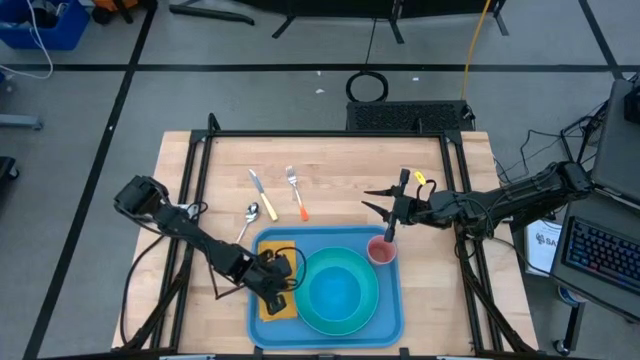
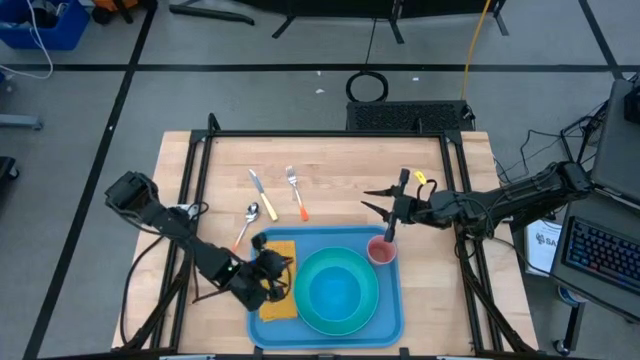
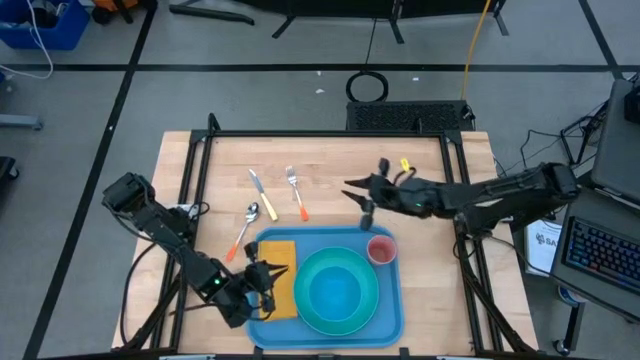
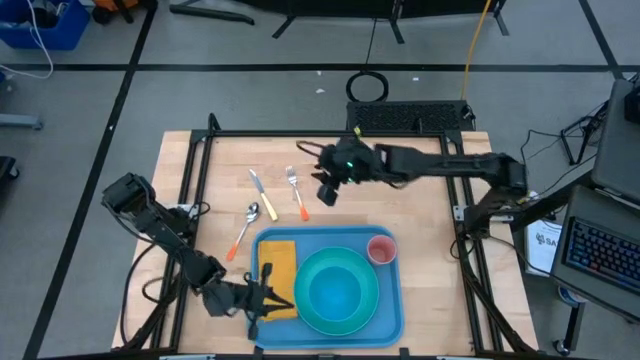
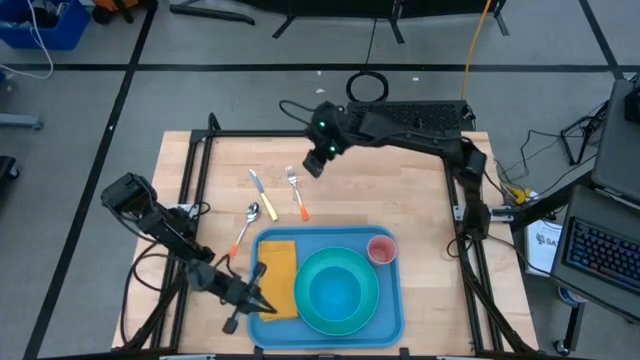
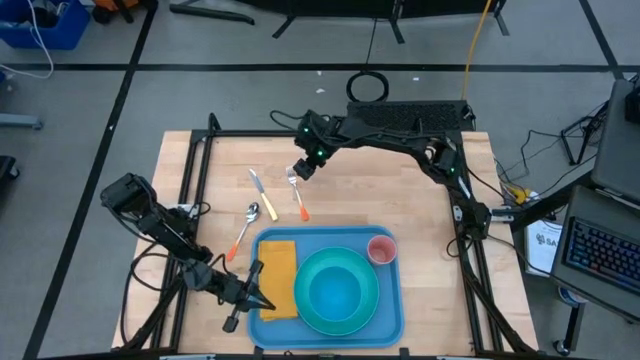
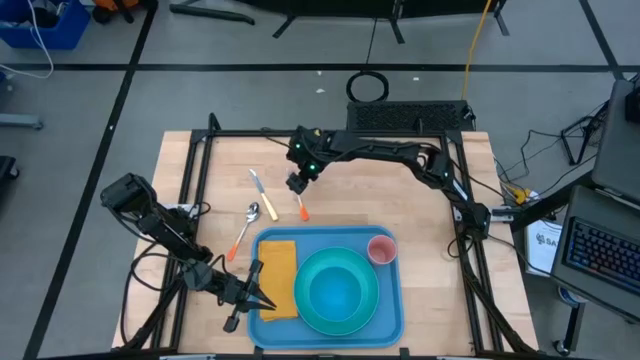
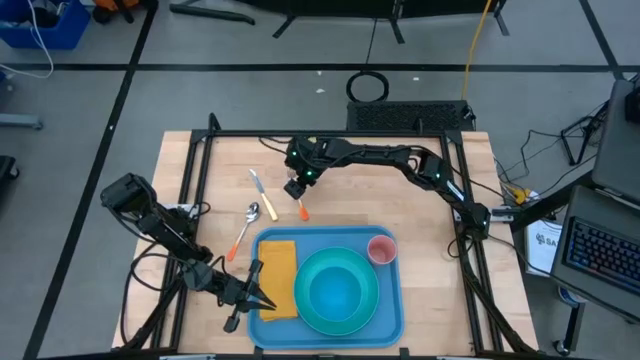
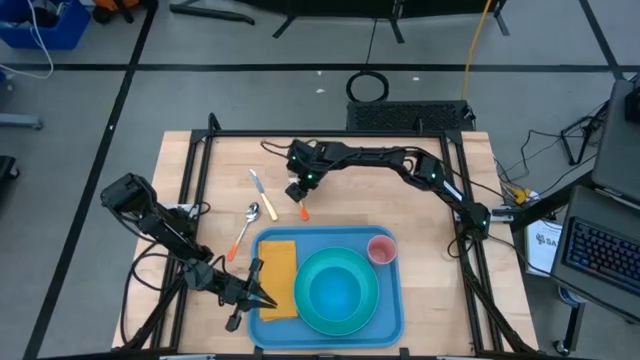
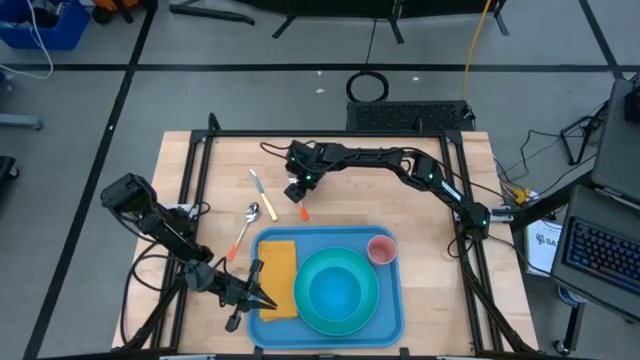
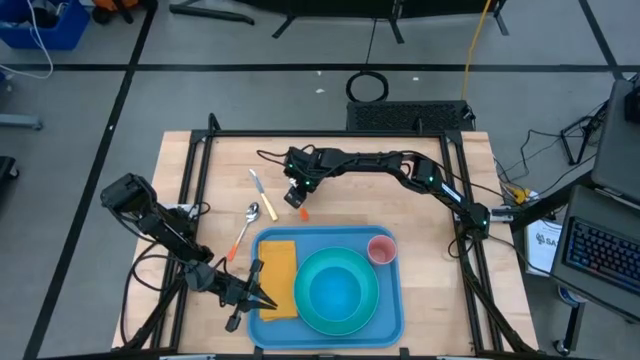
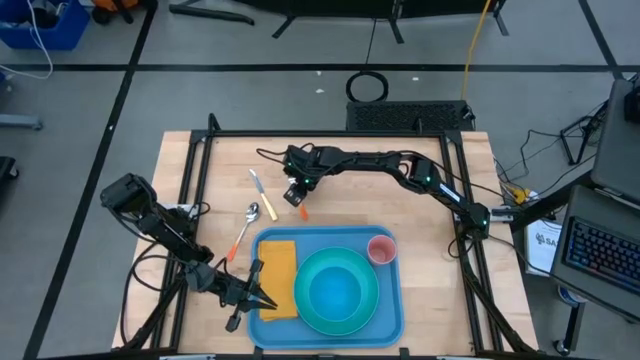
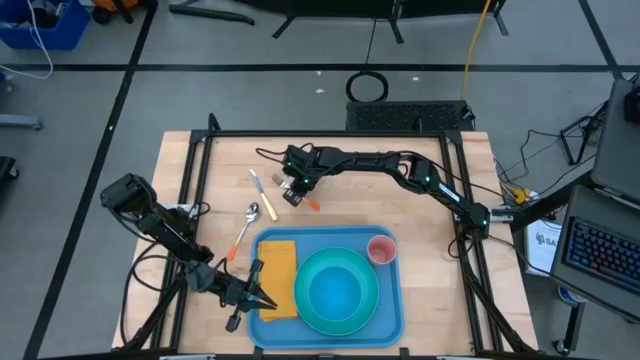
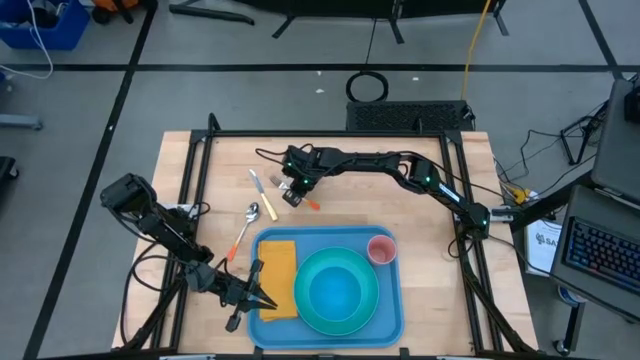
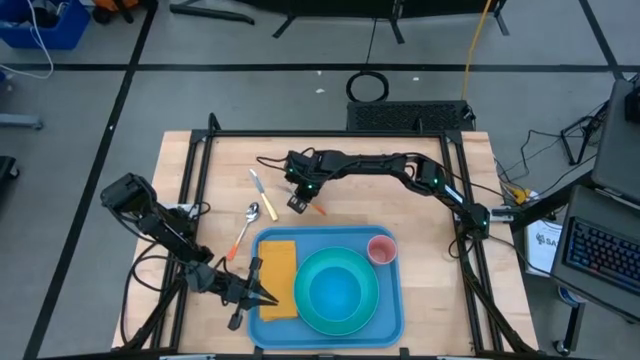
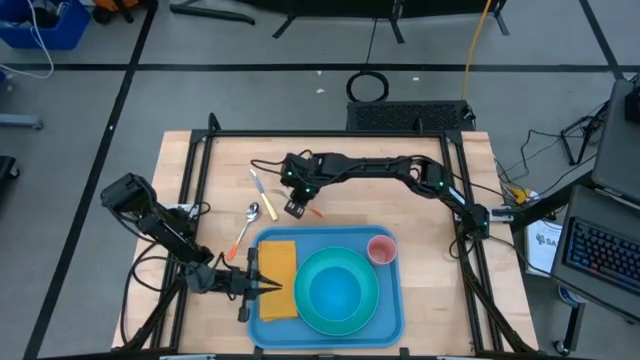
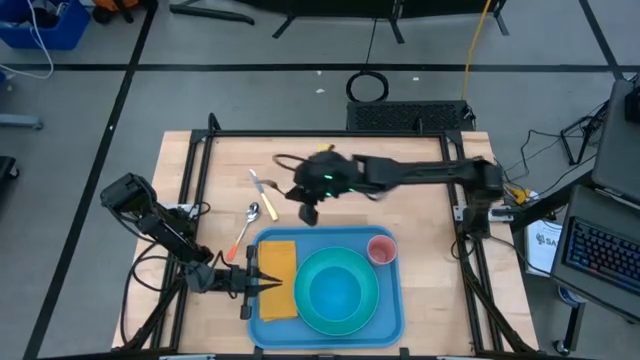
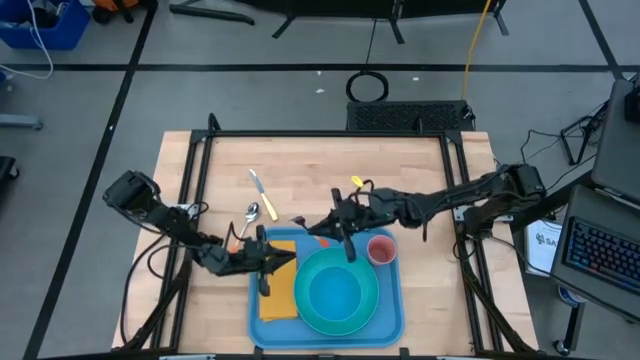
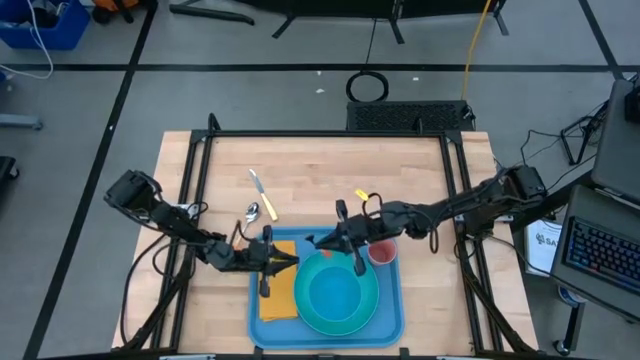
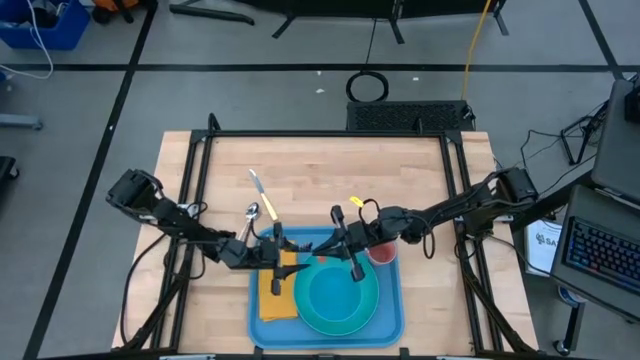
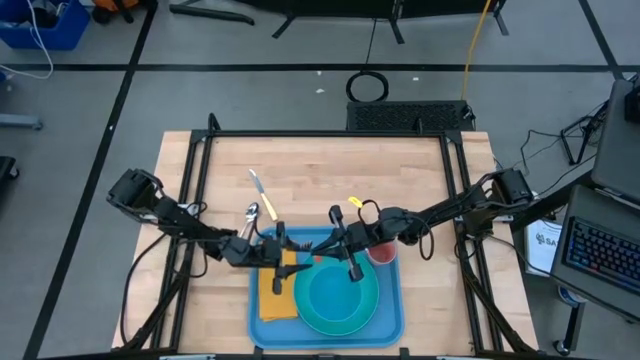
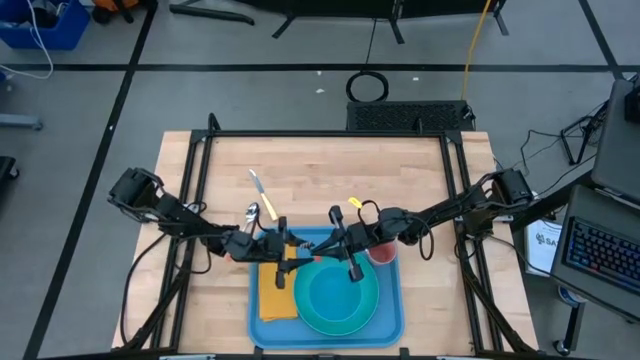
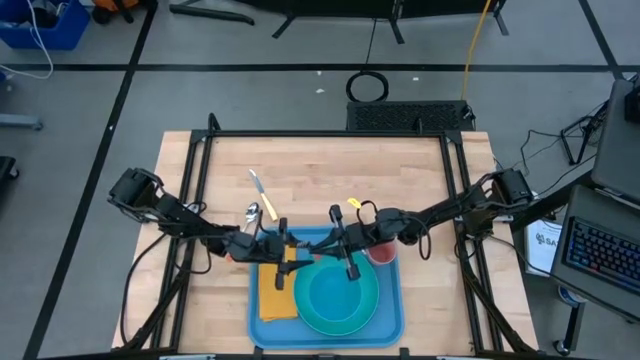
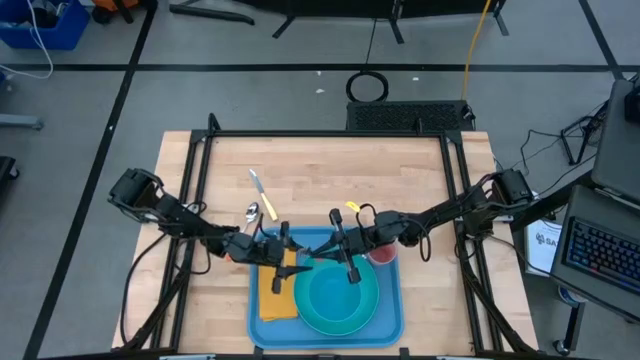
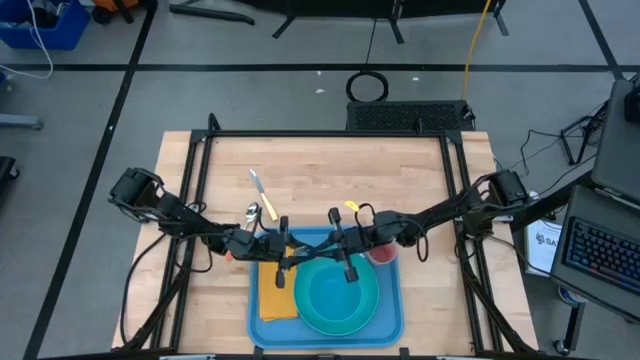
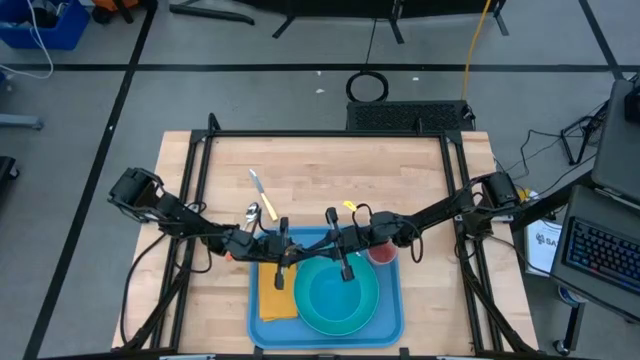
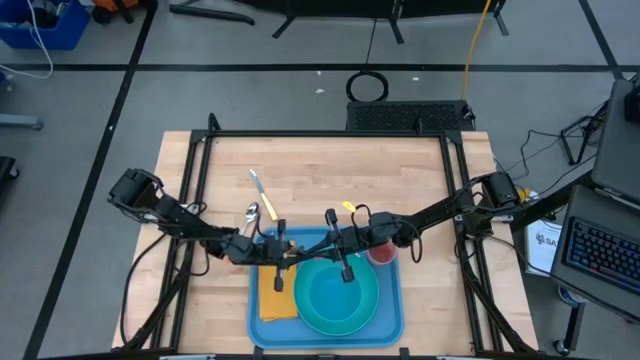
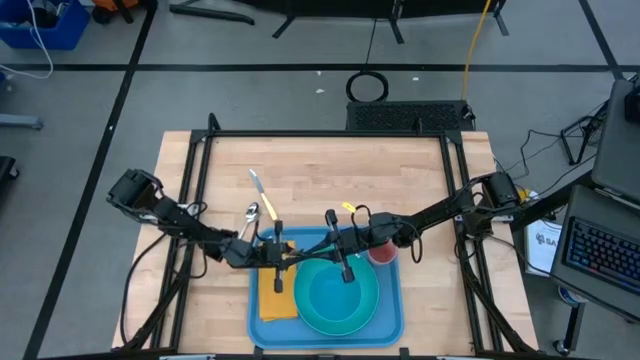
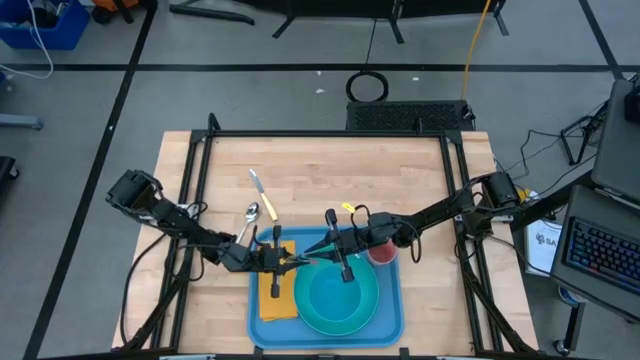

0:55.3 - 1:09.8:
Task: Set up tray
Put the orange fork on the yellow napkin

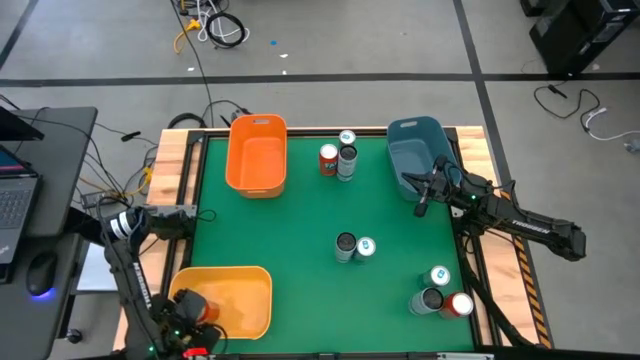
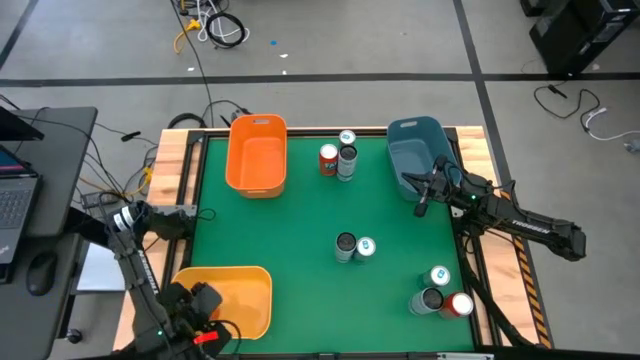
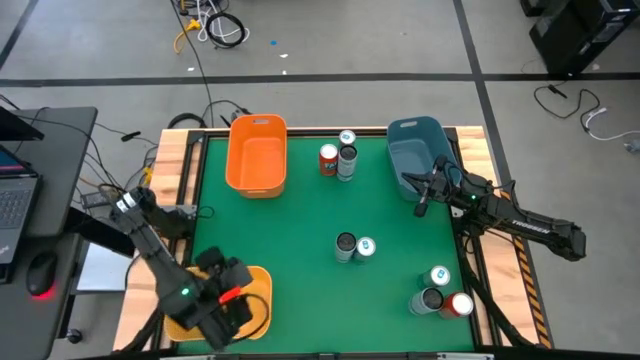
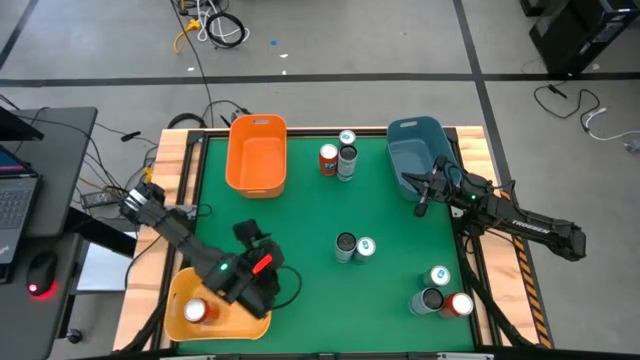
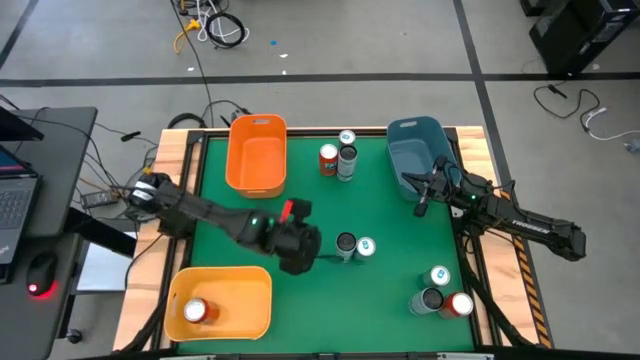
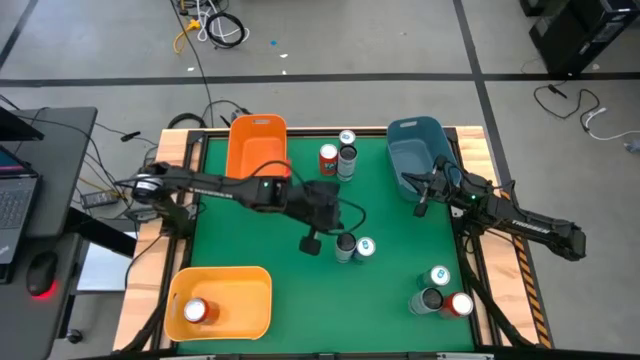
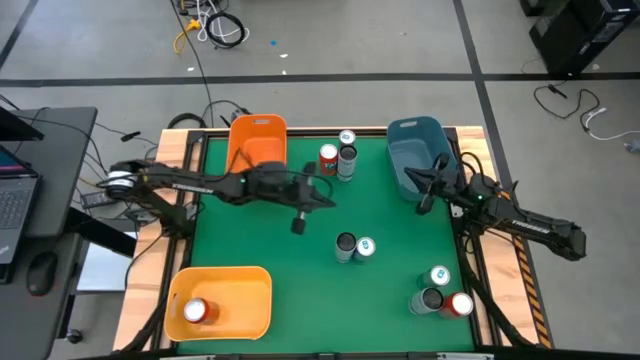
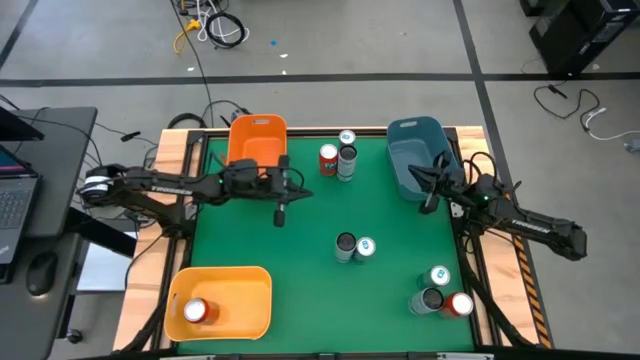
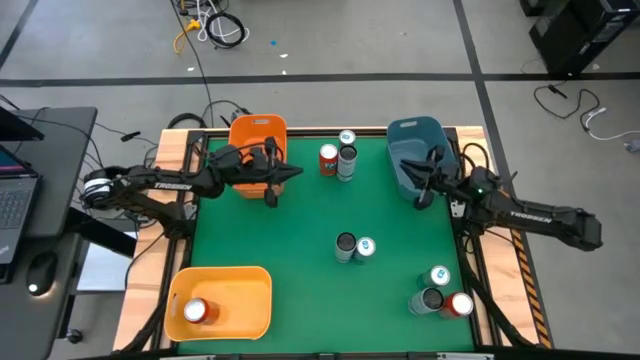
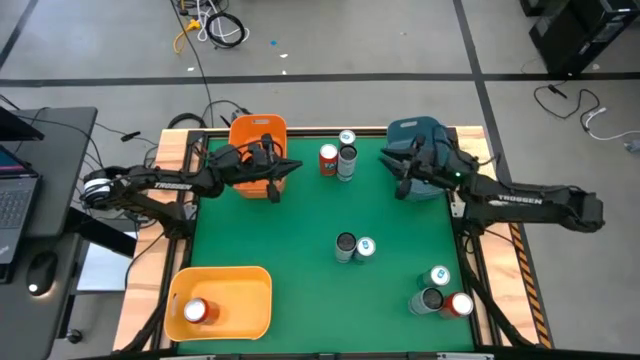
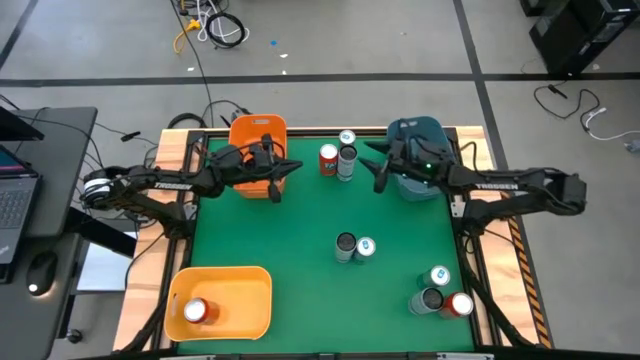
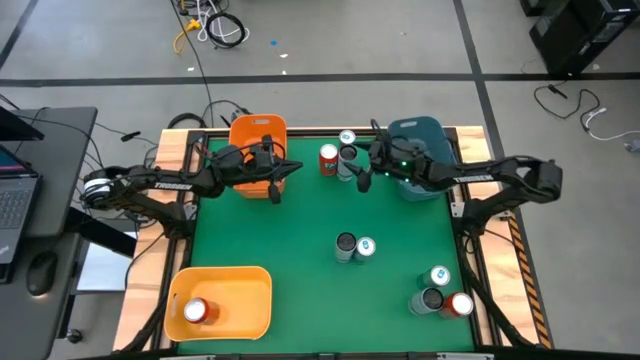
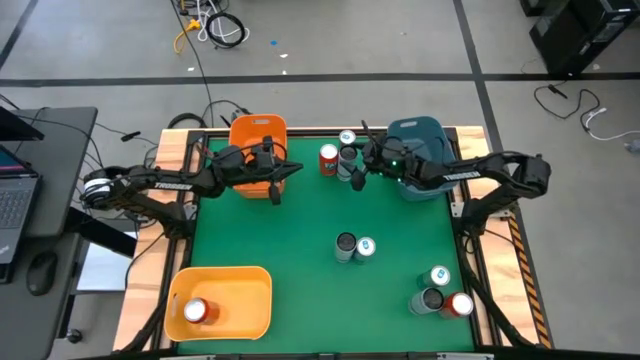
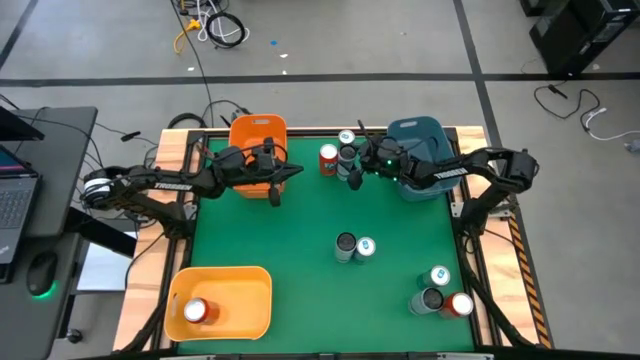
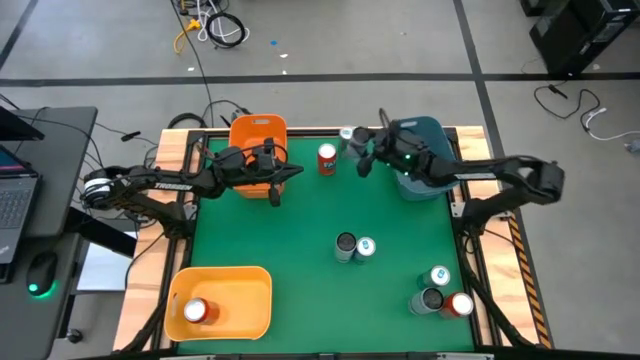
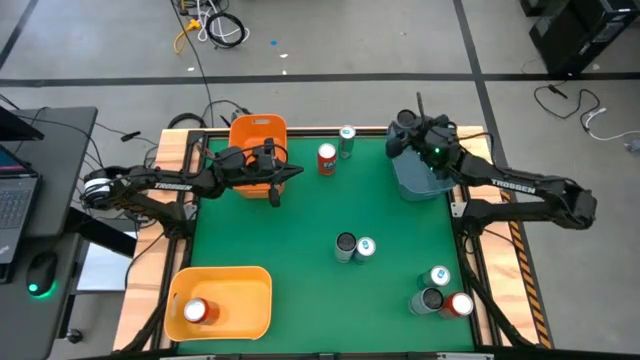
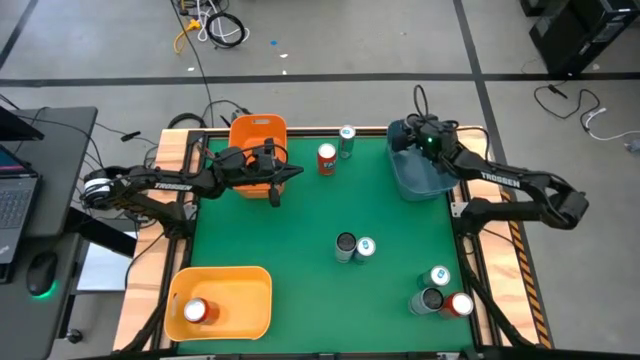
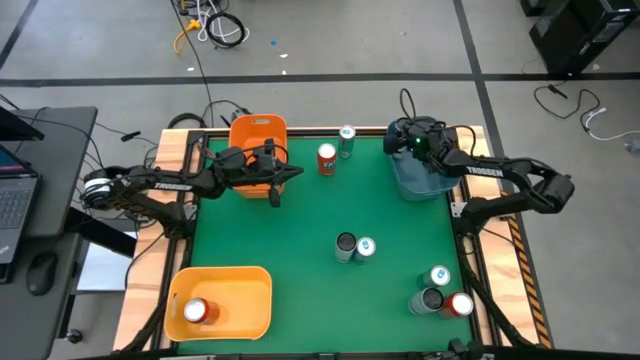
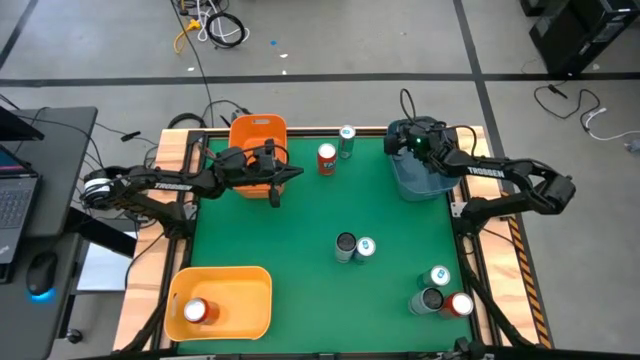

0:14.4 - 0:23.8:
Task: Sort soda cans
Put the top white-blue soda can into the blue bin
